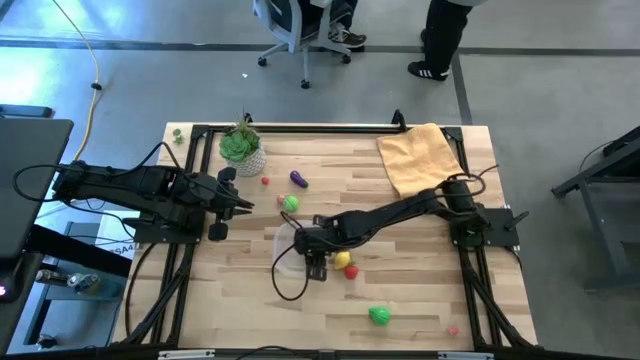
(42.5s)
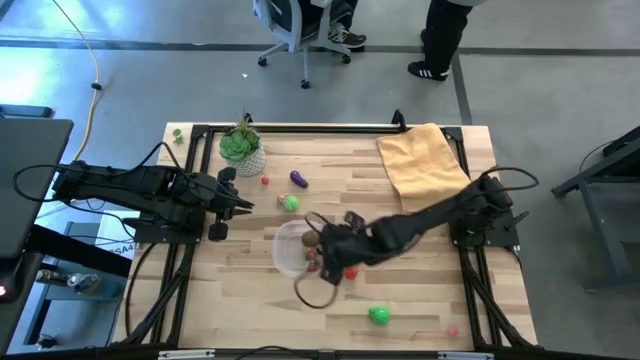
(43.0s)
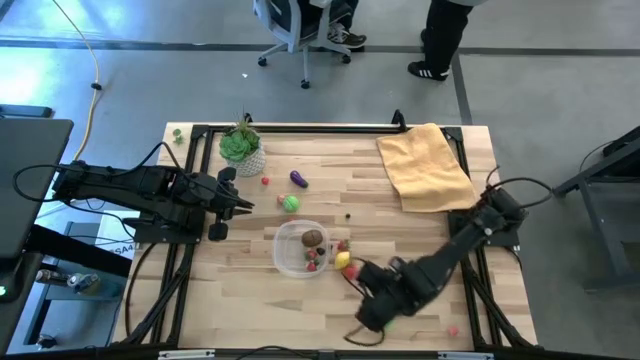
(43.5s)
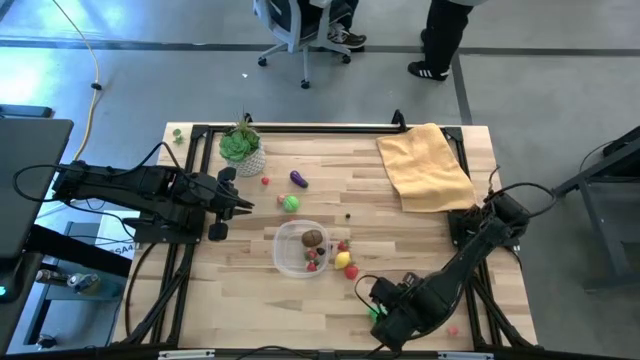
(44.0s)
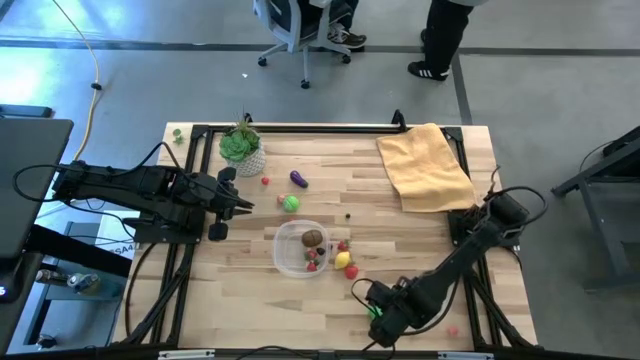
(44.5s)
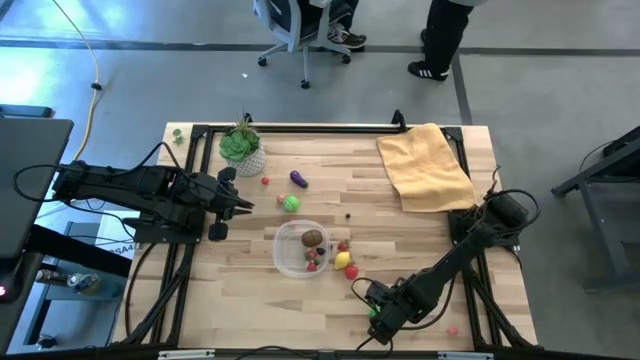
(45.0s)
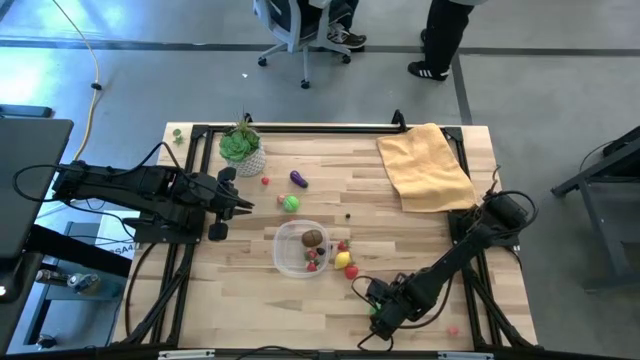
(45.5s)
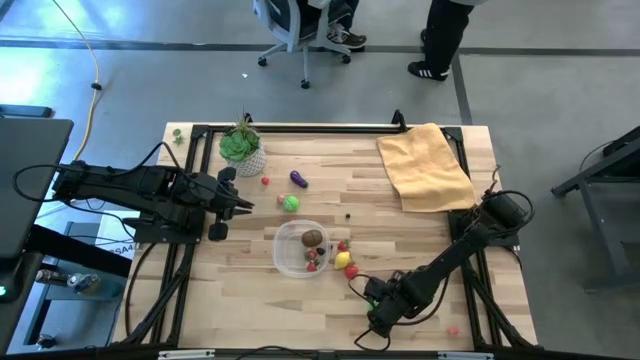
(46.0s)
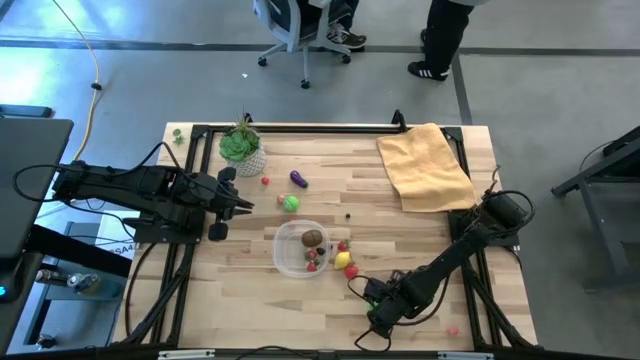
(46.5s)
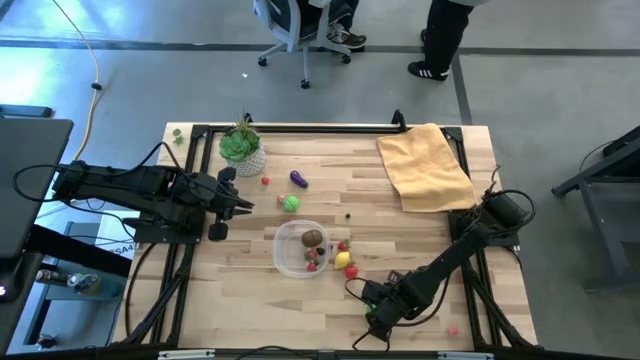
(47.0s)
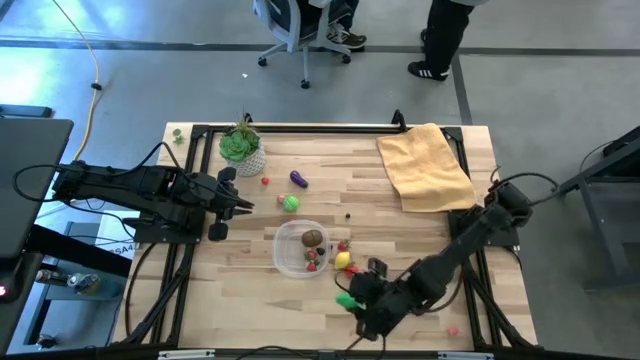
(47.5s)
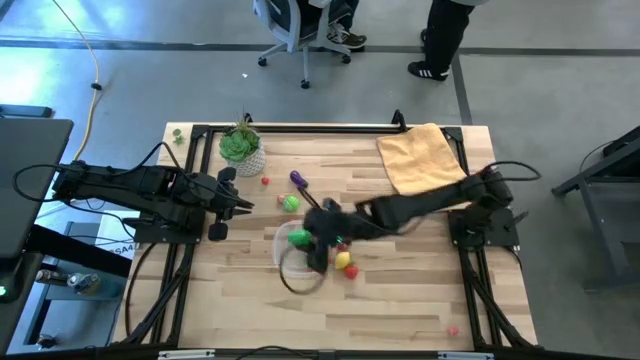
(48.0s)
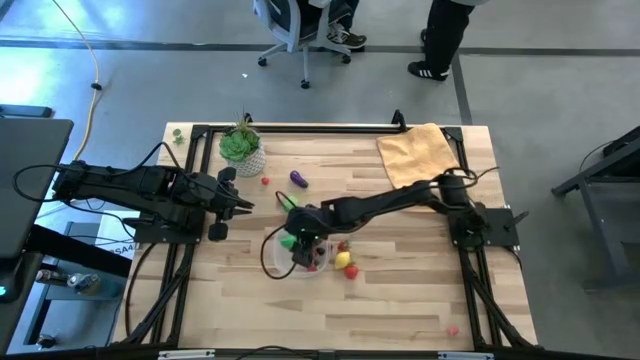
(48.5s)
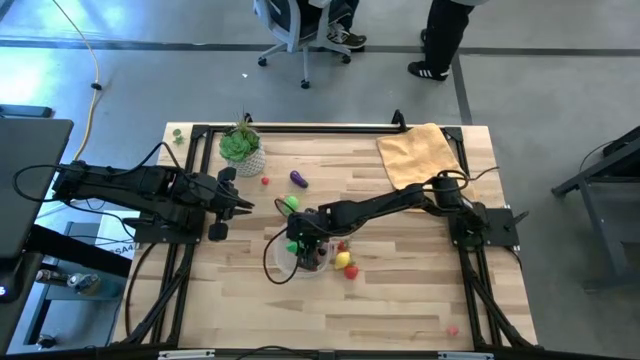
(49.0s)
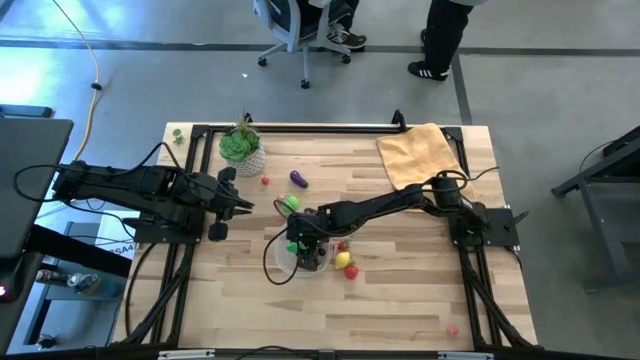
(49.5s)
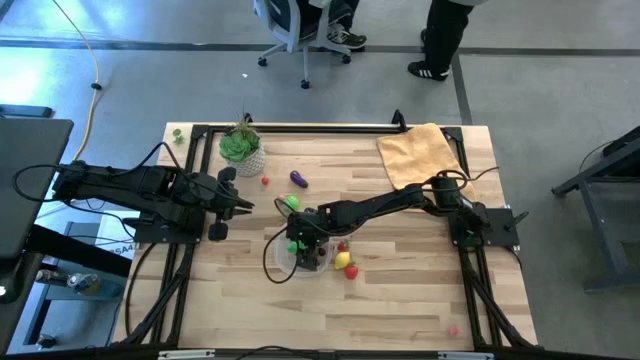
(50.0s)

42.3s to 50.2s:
Task: Pick and placing Produce into tupperware
Put the green pear into the transparent bin

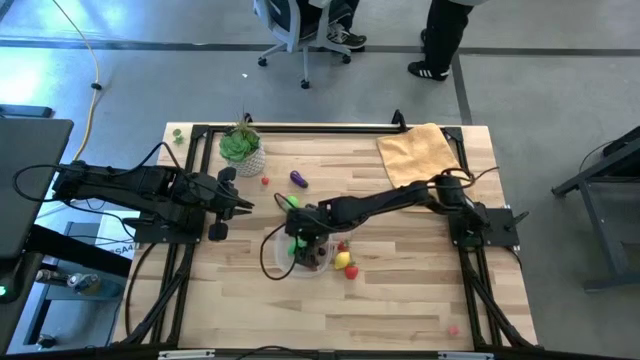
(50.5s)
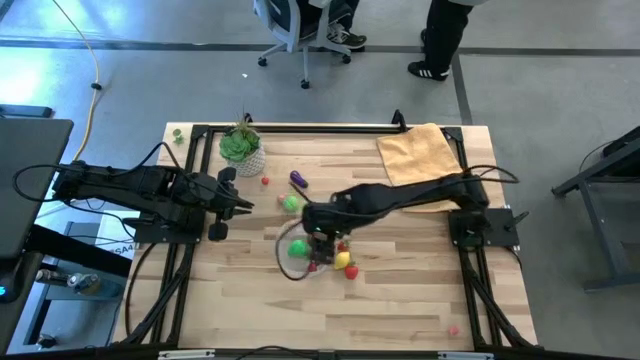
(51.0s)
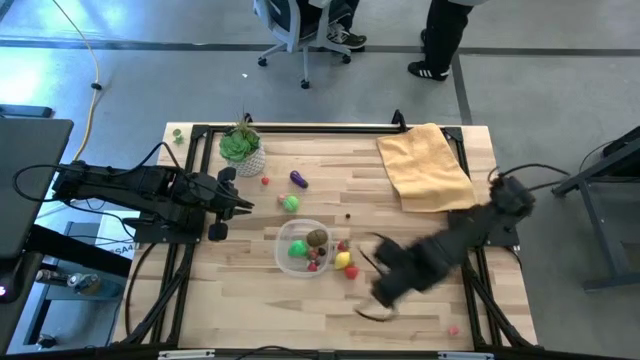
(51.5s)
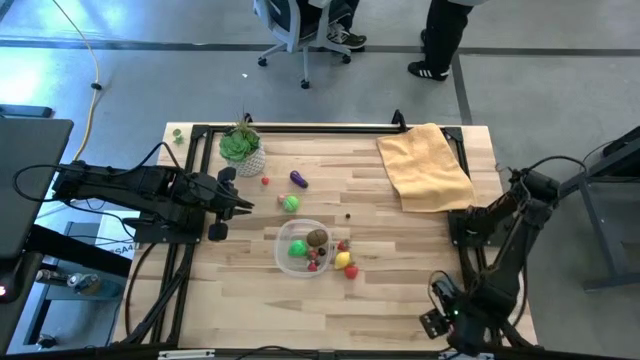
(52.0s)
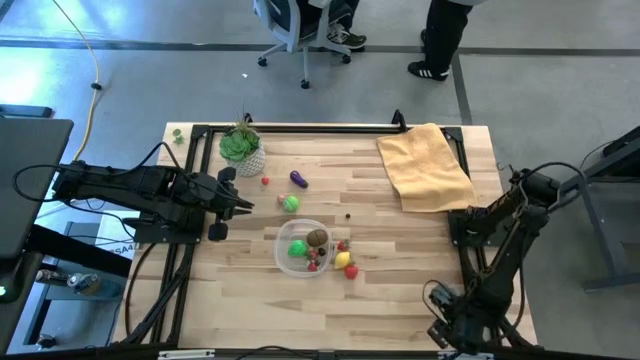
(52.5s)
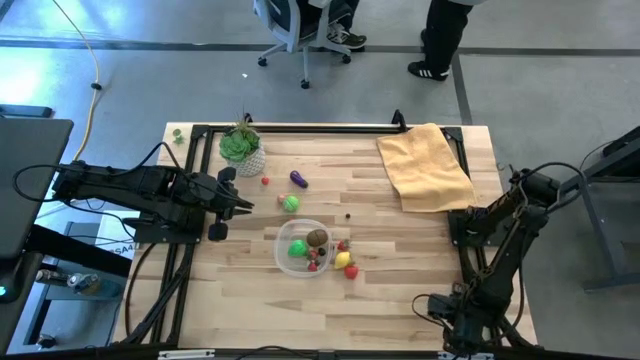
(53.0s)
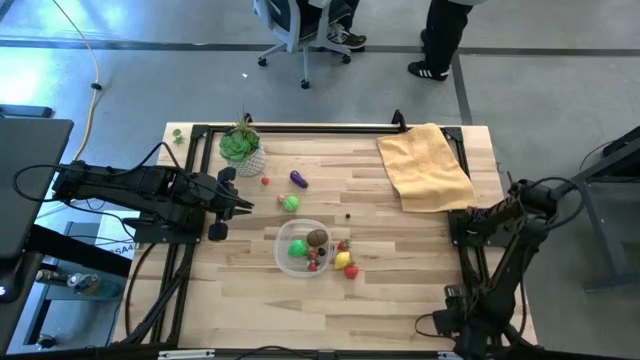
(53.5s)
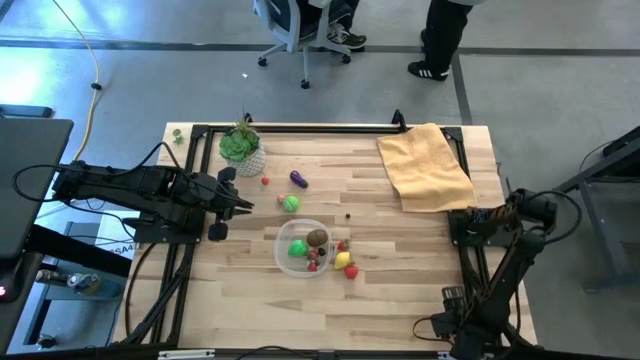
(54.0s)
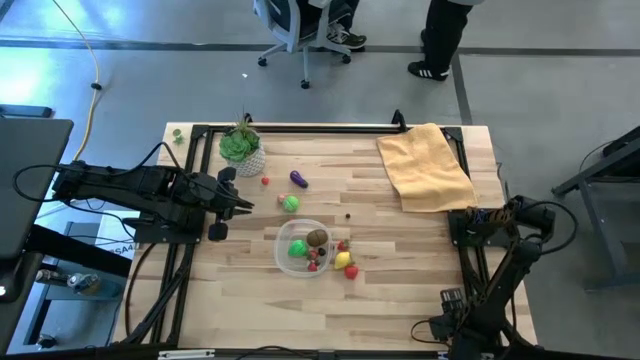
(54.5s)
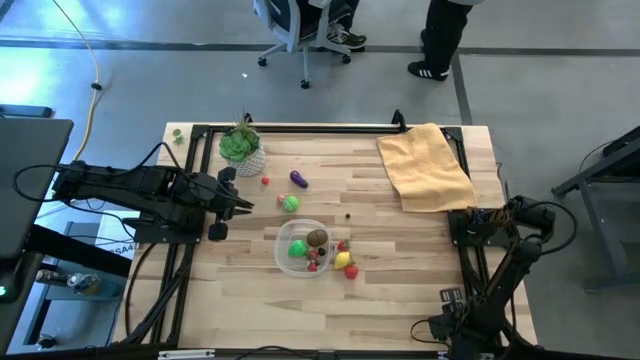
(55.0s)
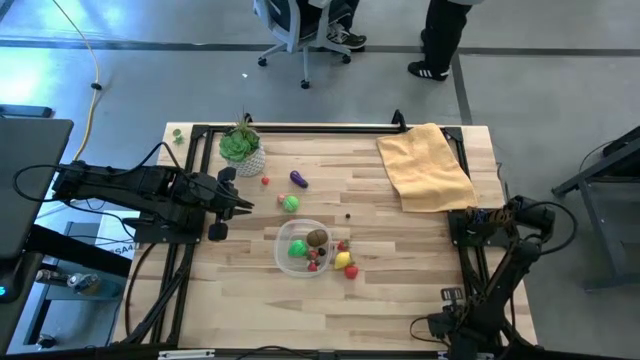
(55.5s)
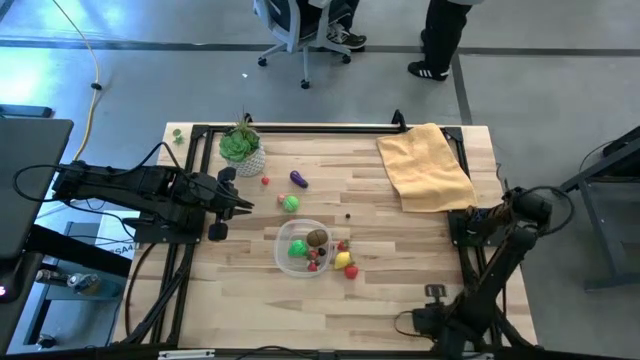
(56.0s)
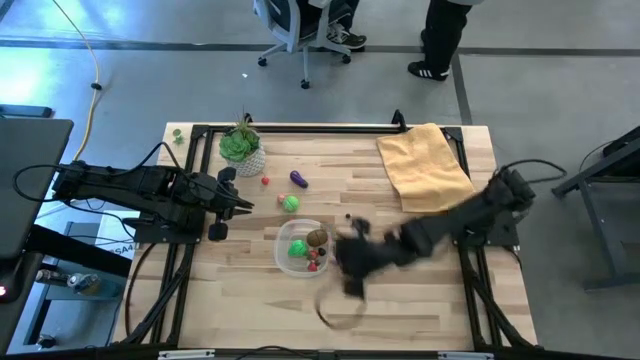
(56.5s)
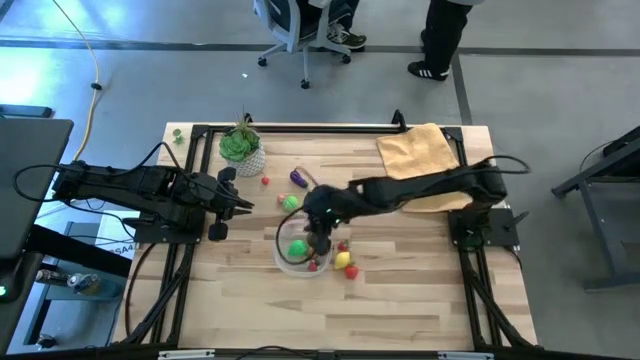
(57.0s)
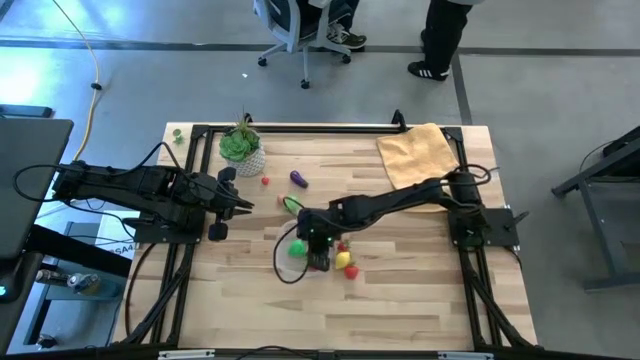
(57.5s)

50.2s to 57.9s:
Put the pink peach into the transparent bin

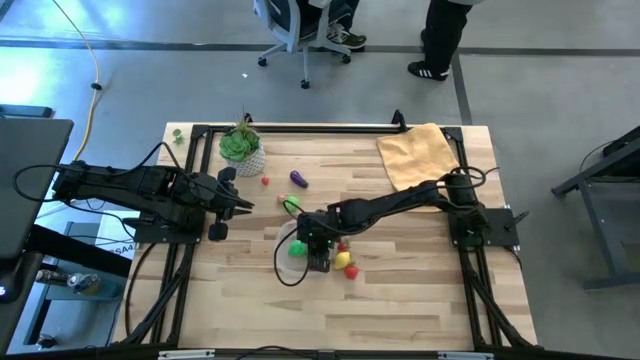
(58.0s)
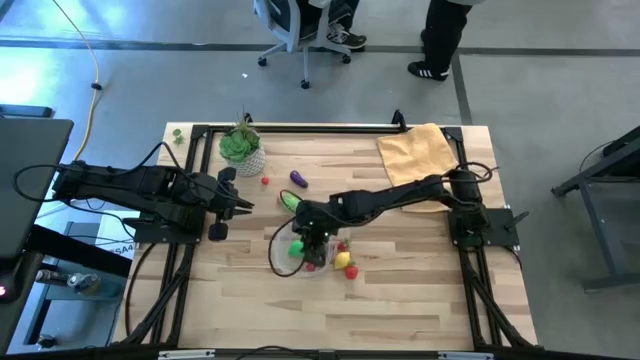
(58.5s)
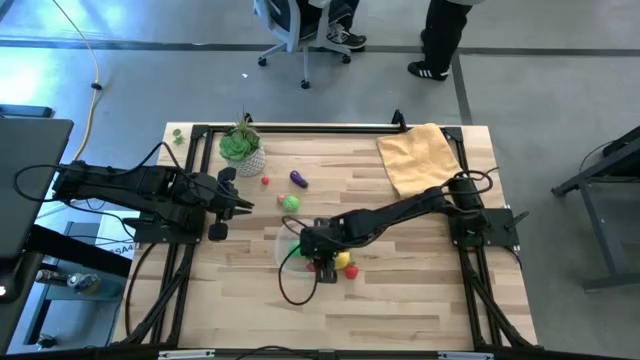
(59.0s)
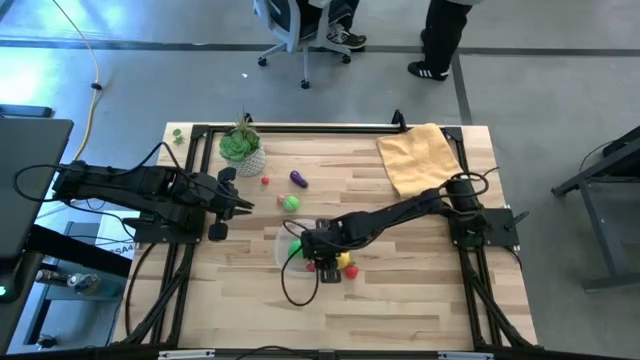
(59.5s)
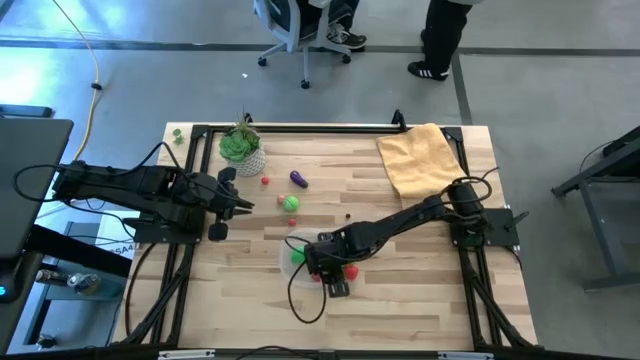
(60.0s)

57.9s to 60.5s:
Adjust the transparent bin

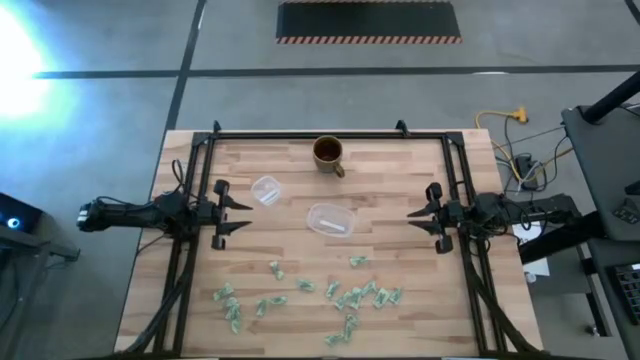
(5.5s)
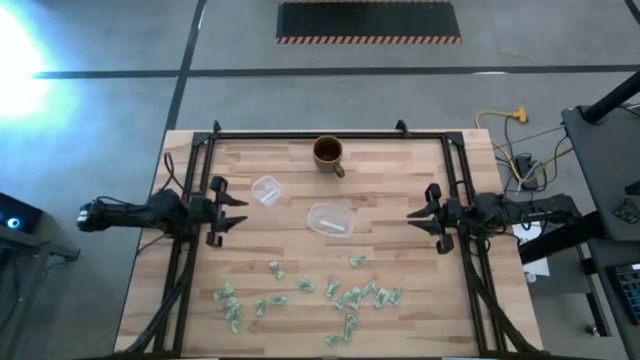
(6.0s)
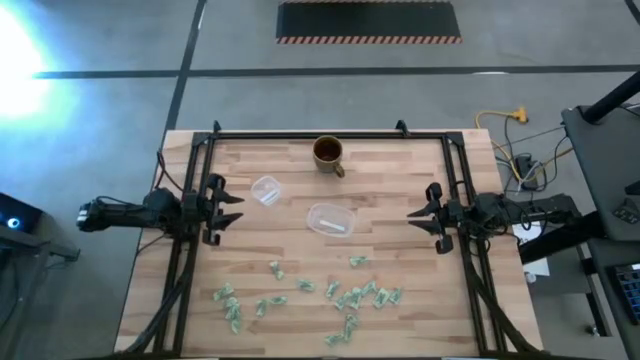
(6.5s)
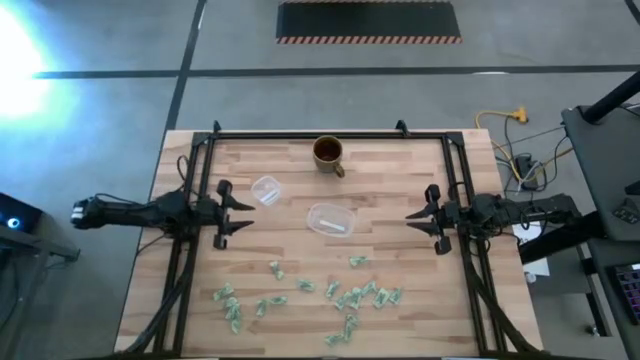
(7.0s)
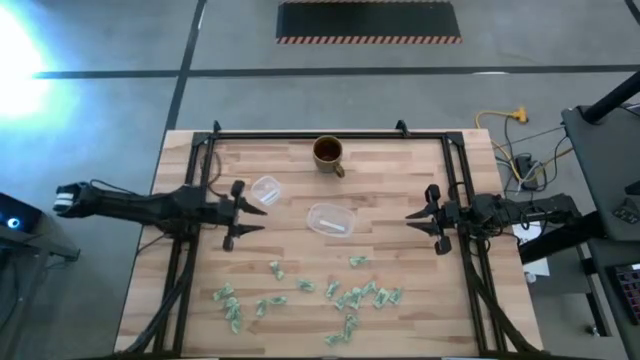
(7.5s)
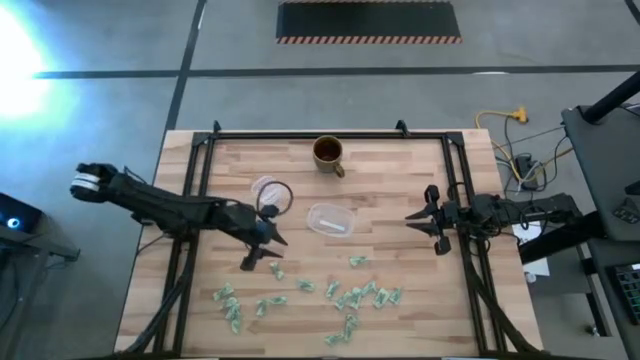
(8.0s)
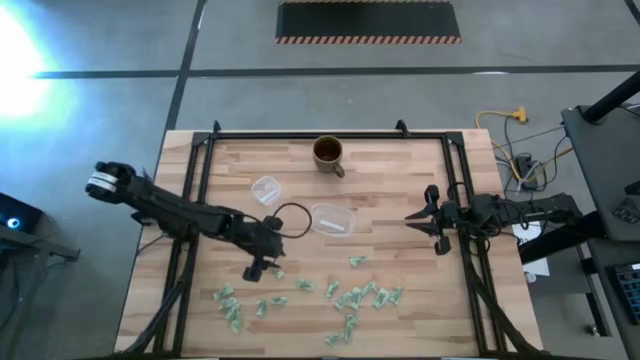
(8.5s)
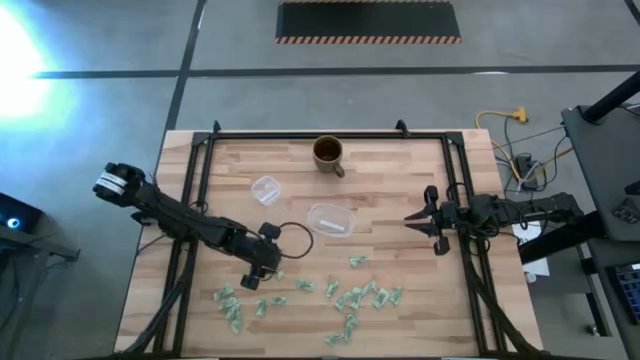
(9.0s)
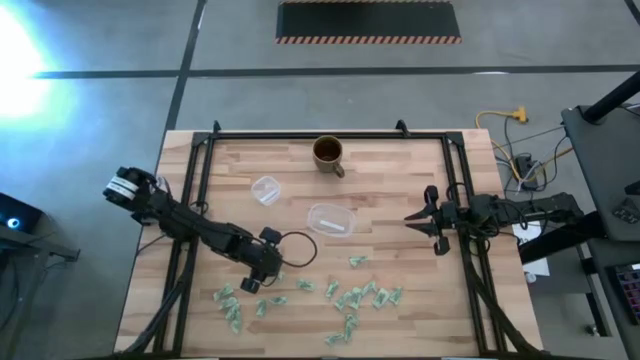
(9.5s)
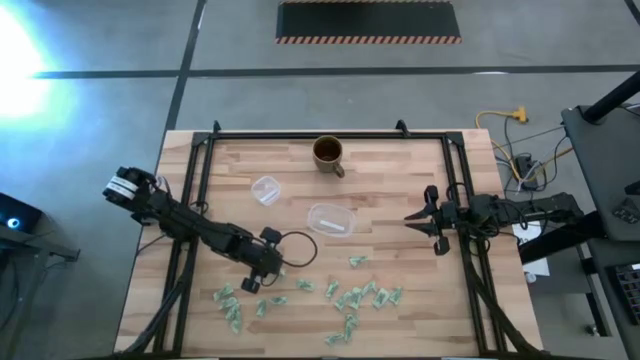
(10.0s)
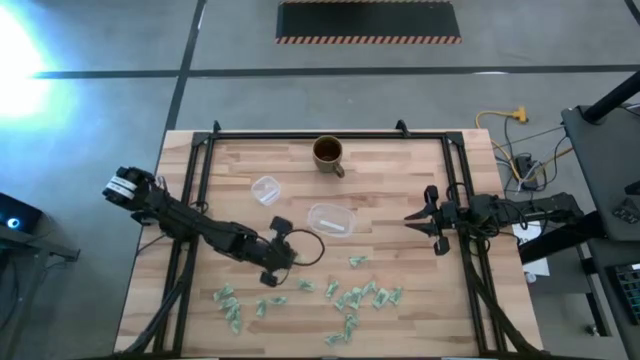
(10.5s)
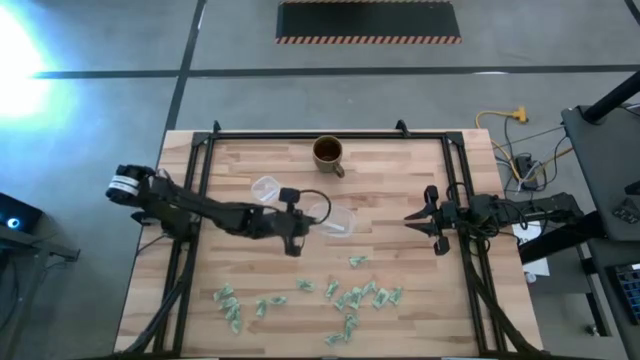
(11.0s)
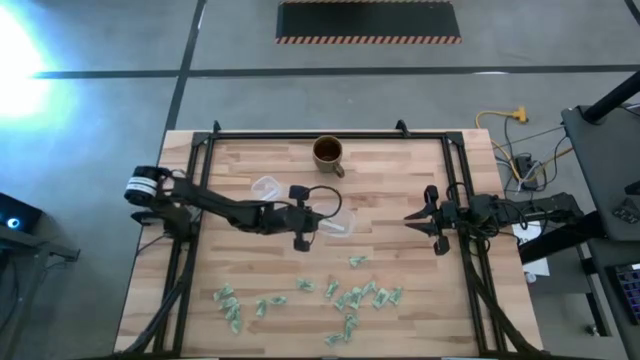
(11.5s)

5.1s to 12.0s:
Task: Pick and place Stevia / Truvia into bins
Put the green stevia packet into the transparent container
